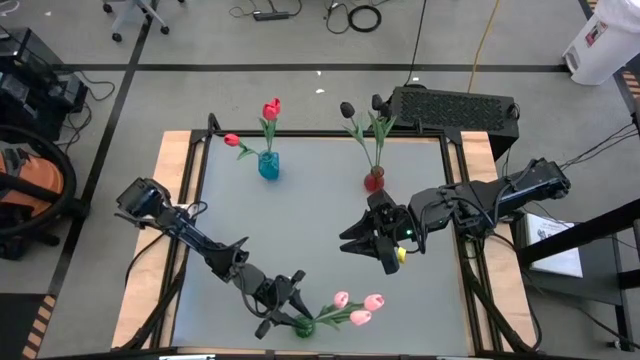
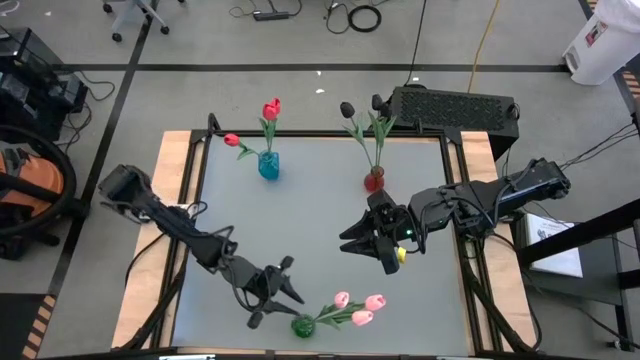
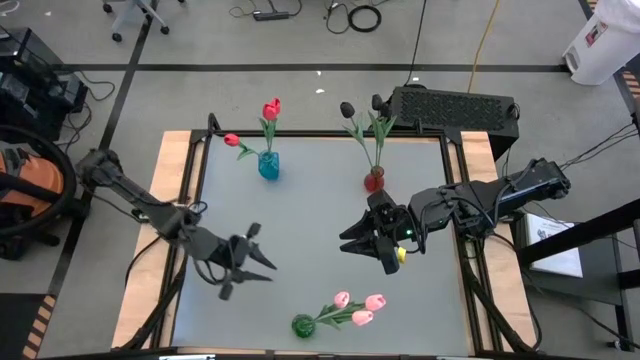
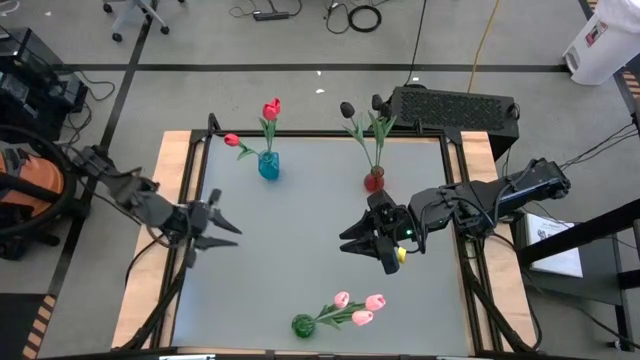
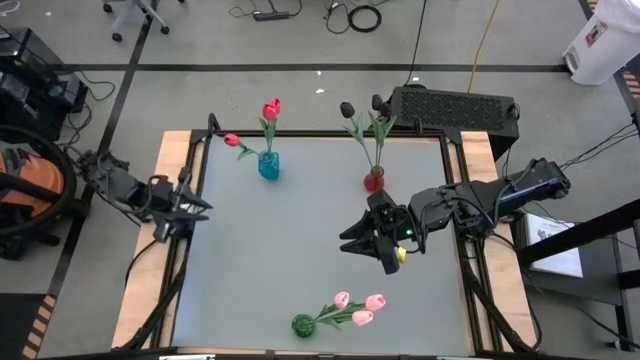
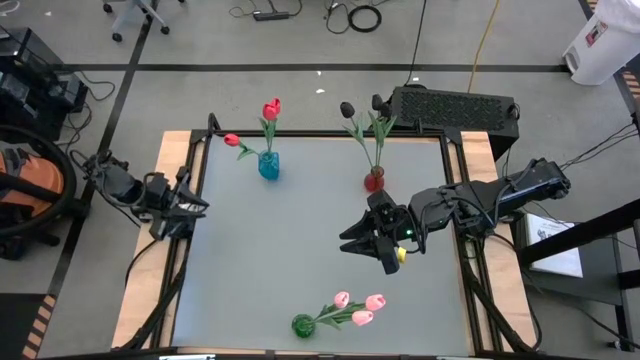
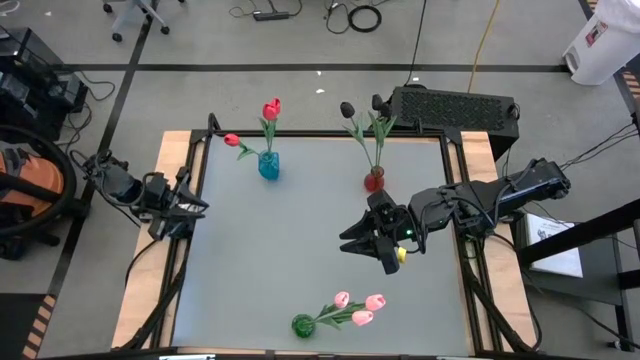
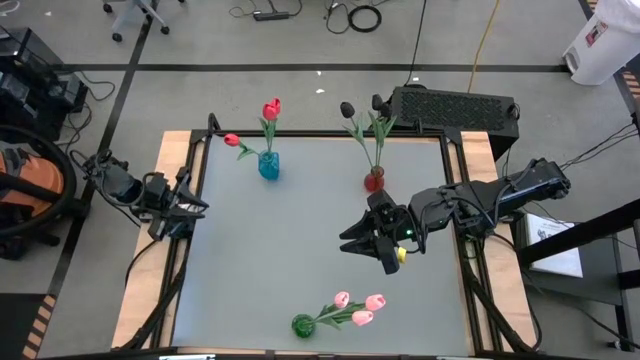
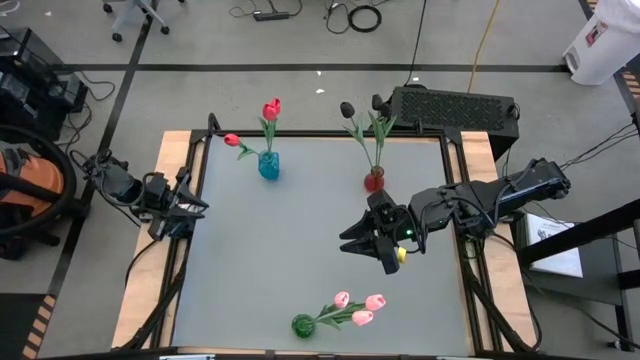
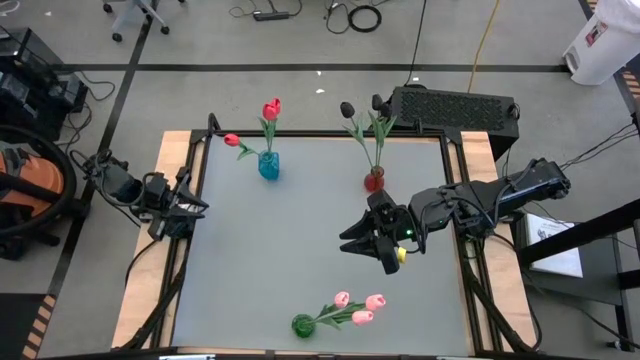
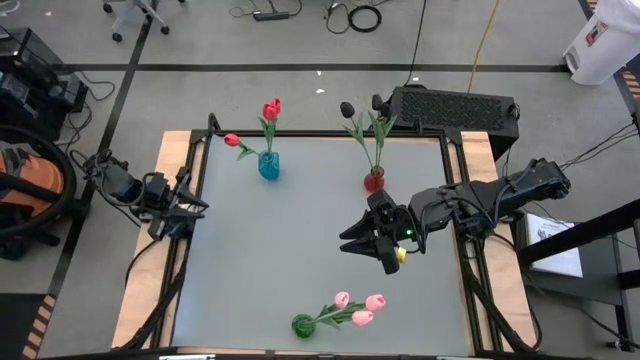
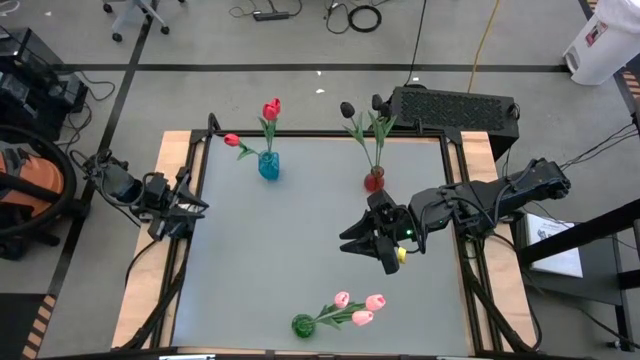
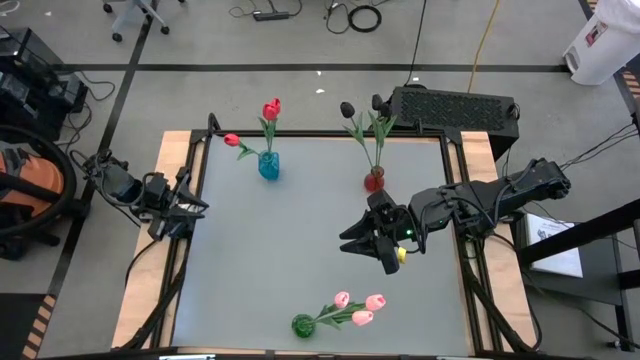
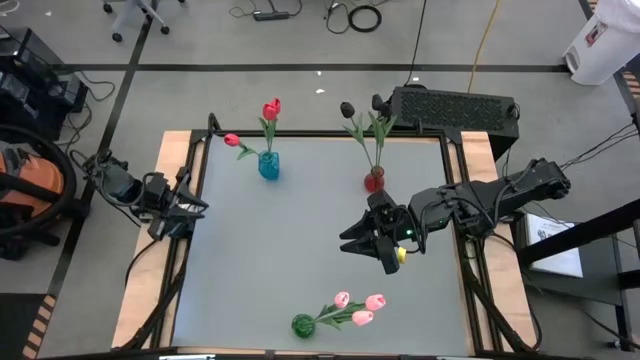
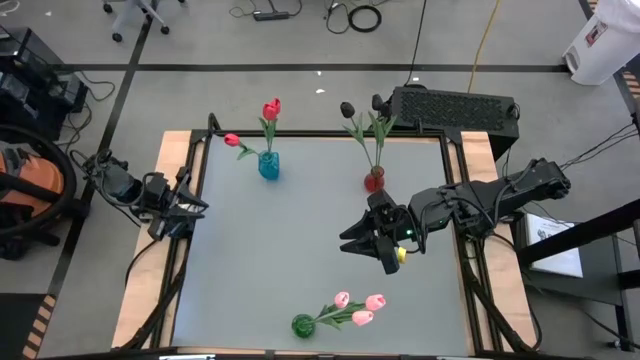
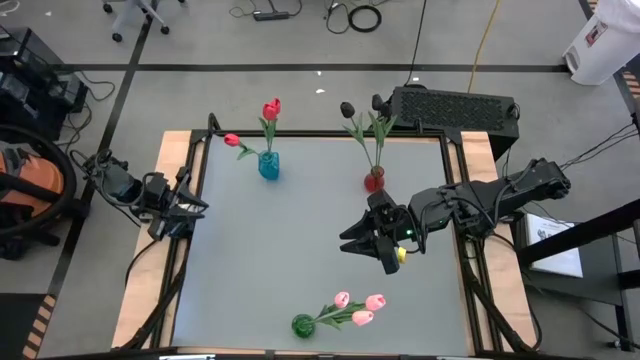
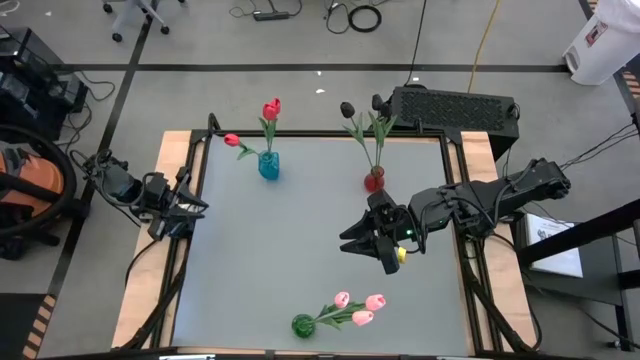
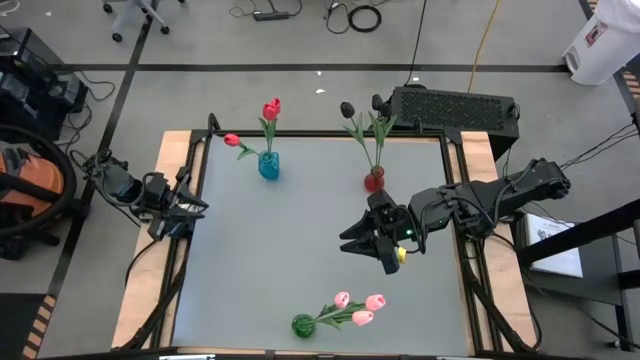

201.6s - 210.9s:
Task: Sort flowers into vase by color
Return to Home Position

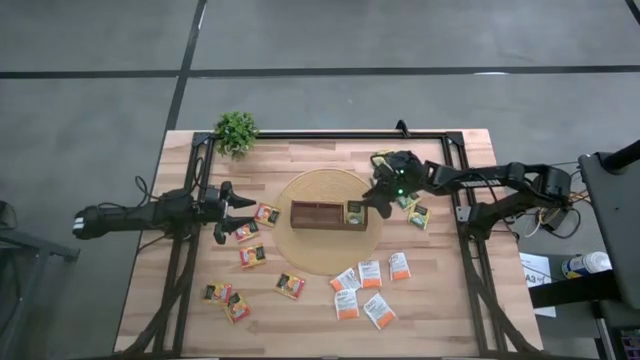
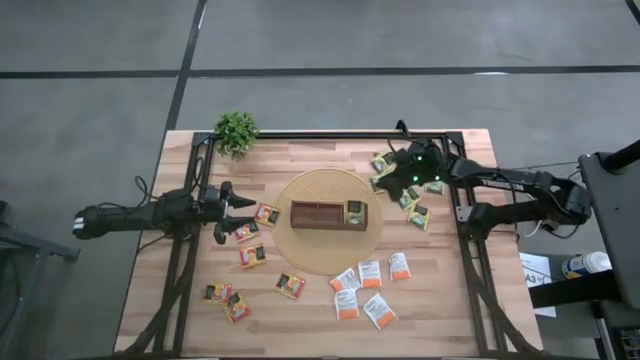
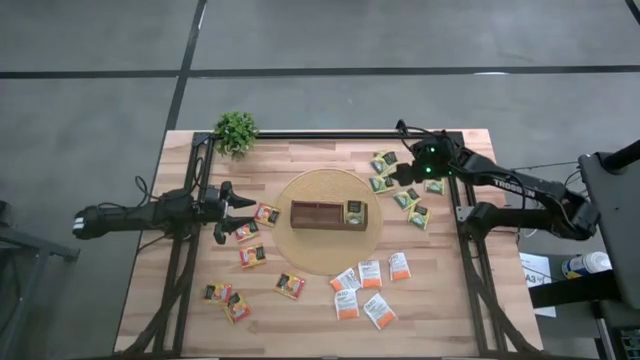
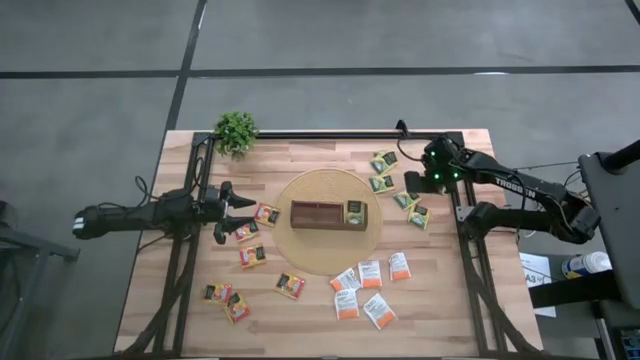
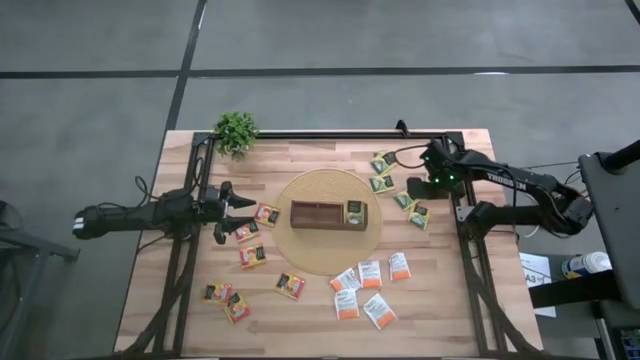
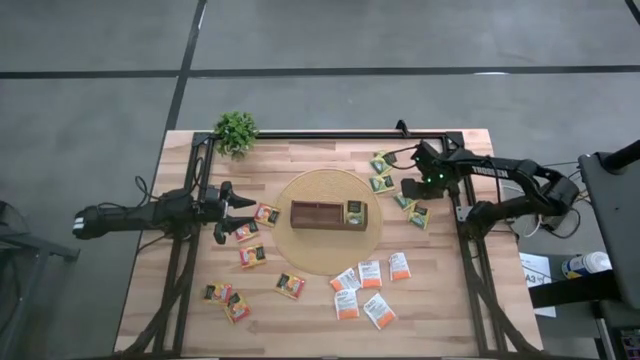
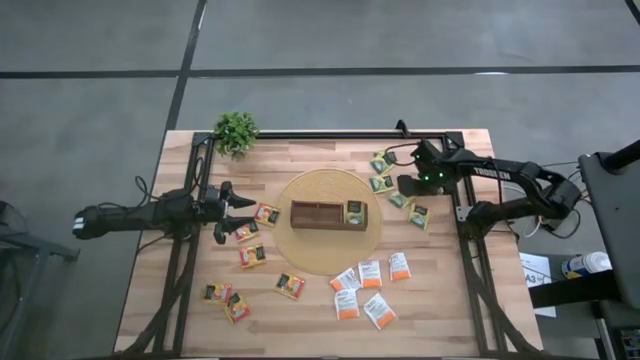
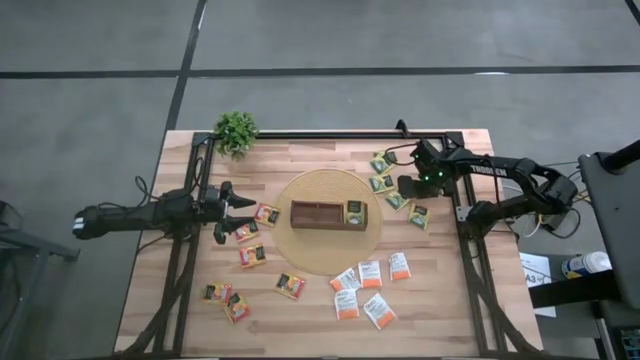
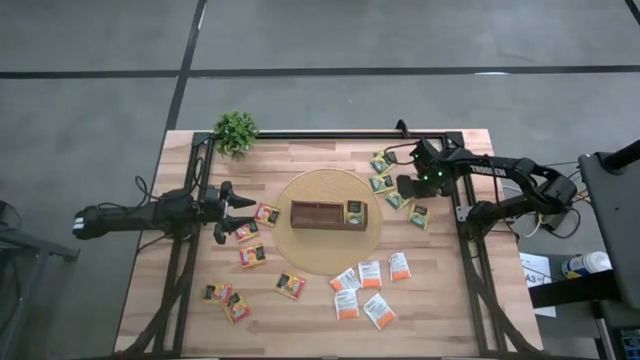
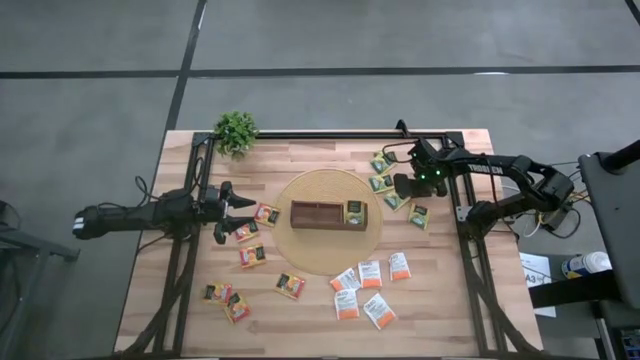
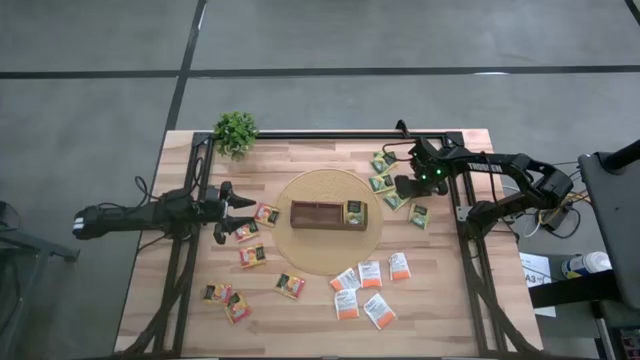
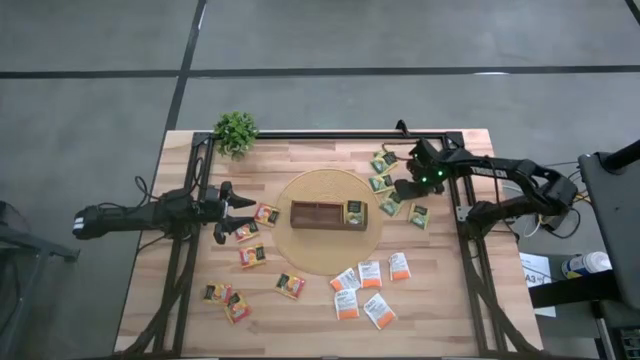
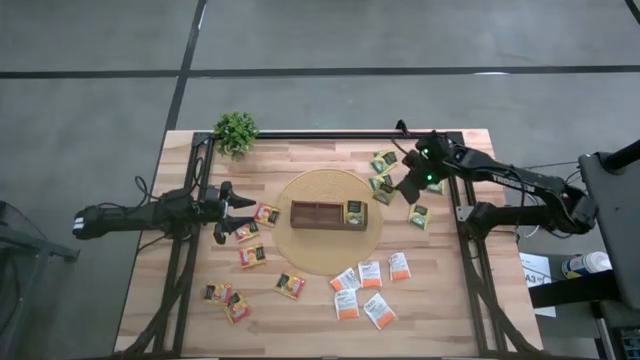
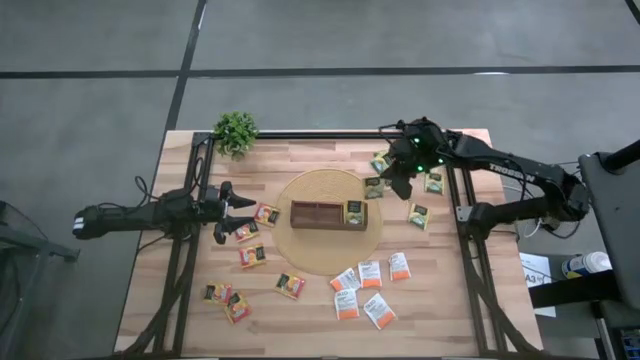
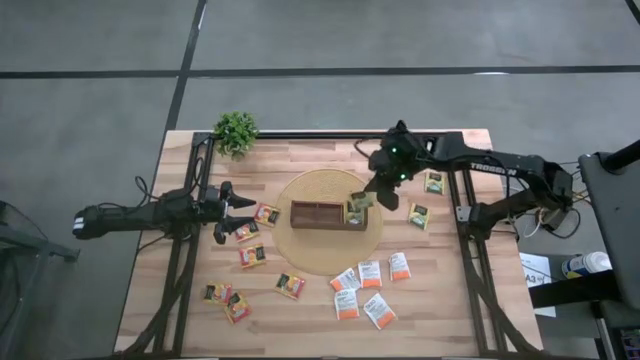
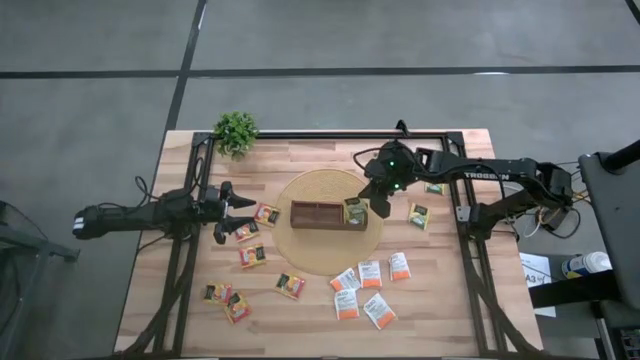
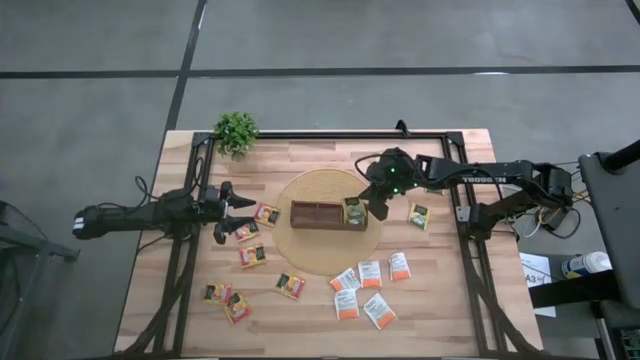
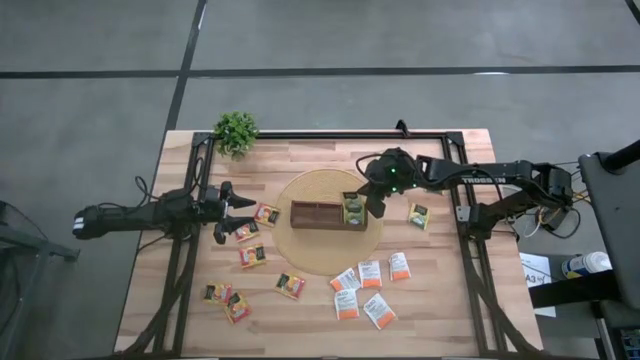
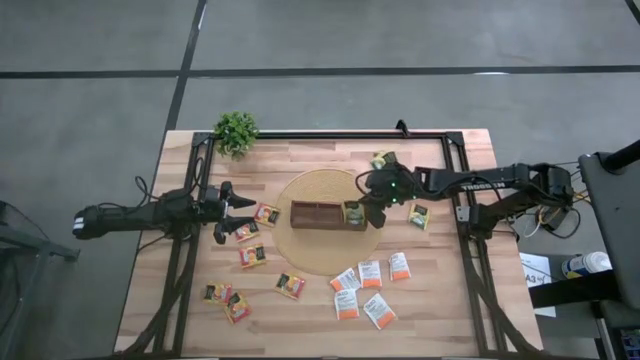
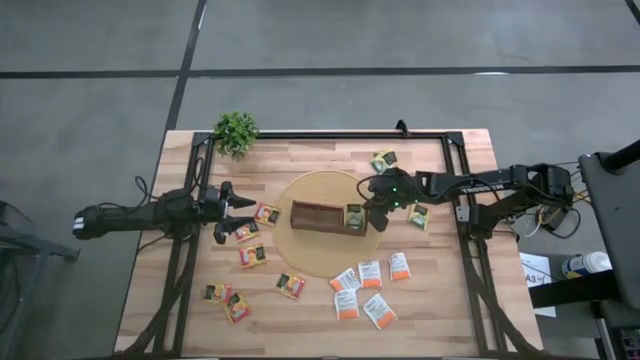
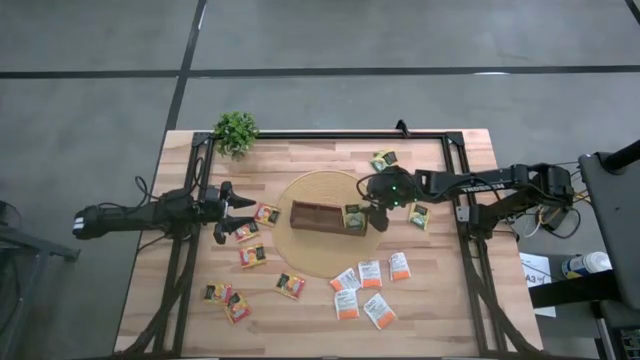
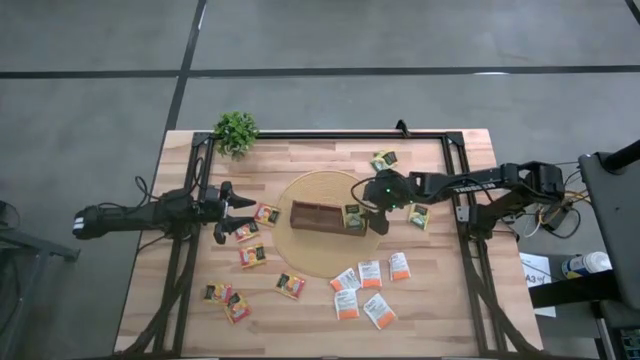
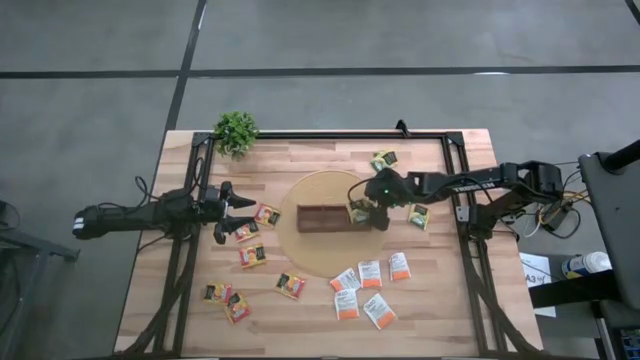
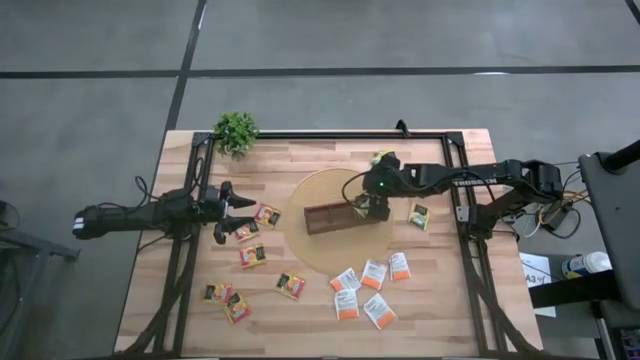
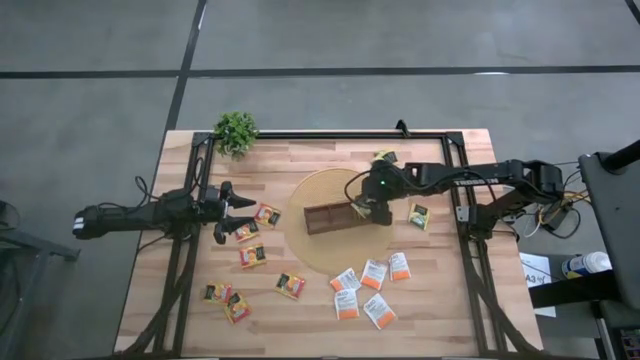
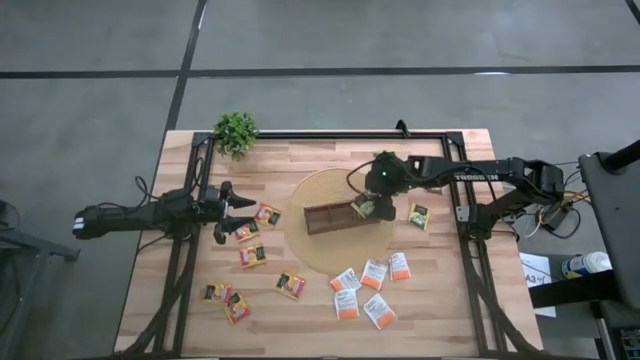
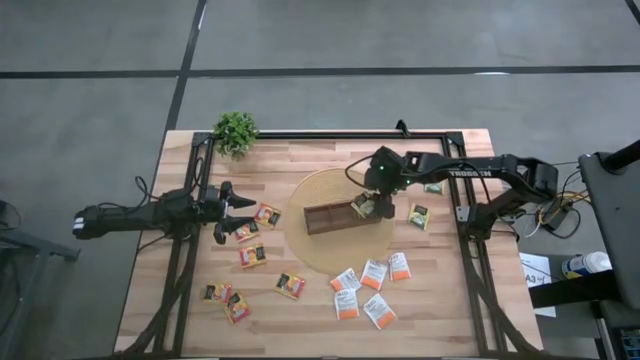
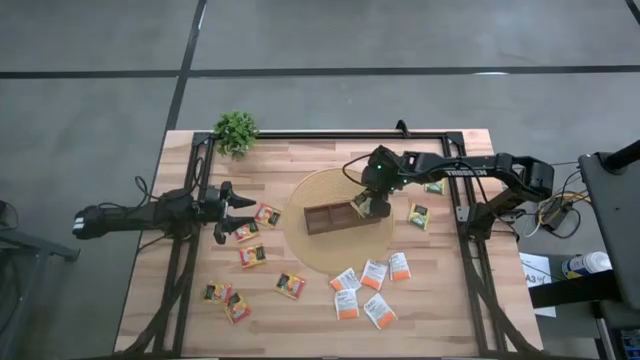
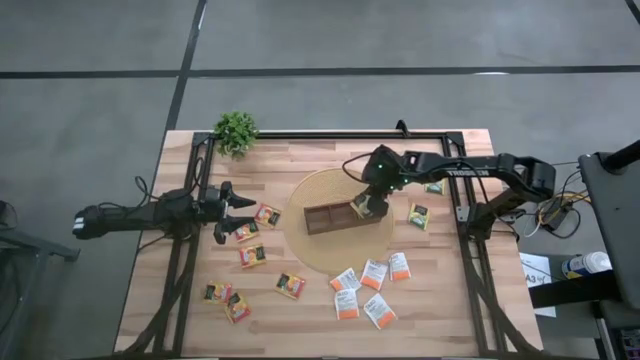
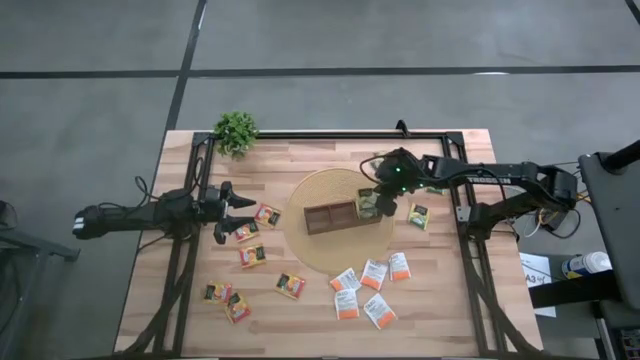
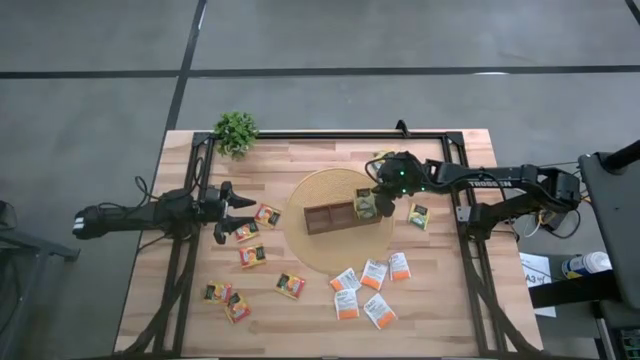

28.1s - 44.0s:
Task: Pick & Place Tea
Put the yellow tea bag into the right section of the wooden organizer
